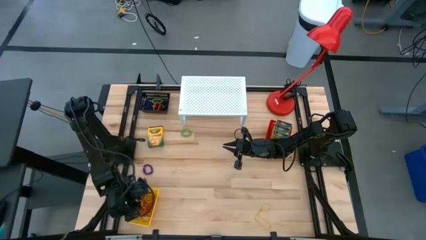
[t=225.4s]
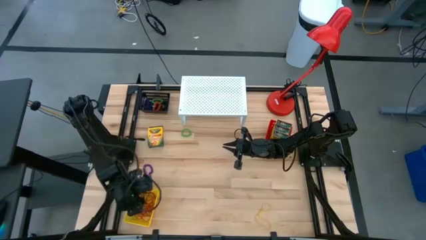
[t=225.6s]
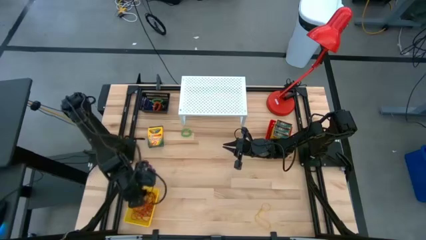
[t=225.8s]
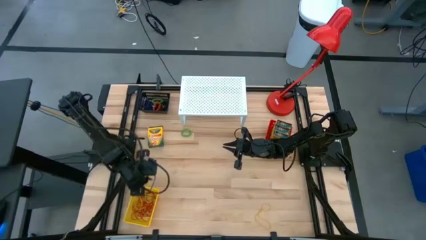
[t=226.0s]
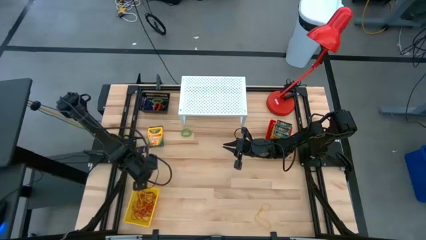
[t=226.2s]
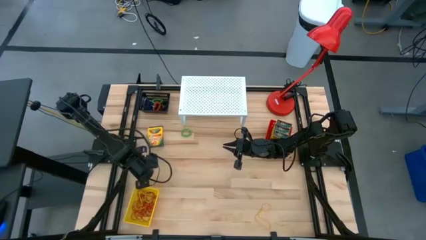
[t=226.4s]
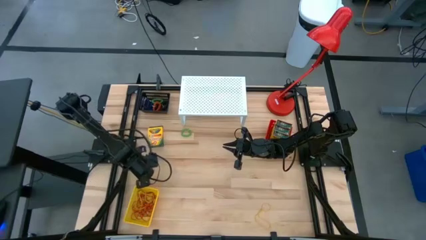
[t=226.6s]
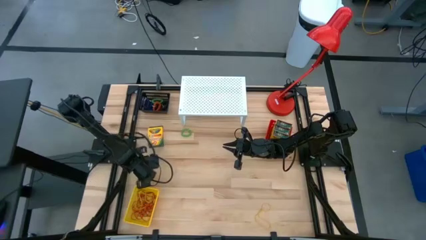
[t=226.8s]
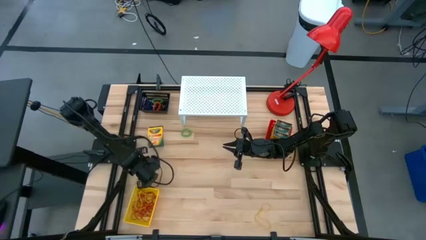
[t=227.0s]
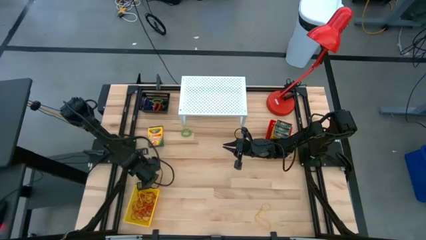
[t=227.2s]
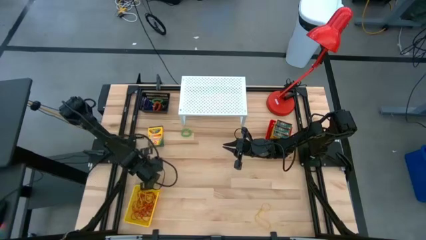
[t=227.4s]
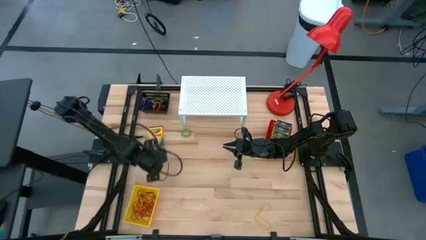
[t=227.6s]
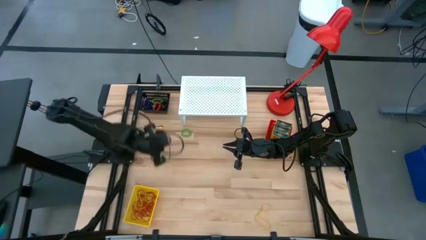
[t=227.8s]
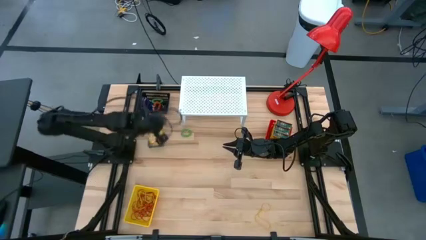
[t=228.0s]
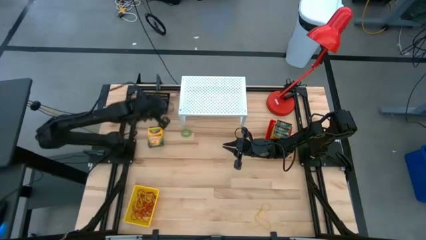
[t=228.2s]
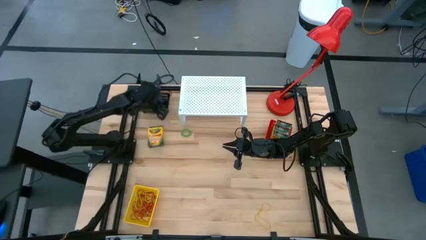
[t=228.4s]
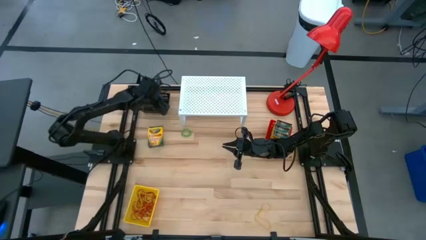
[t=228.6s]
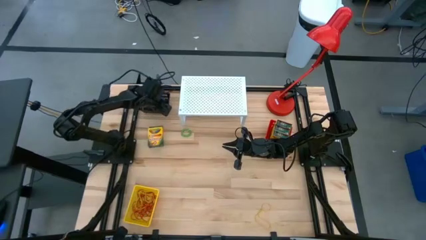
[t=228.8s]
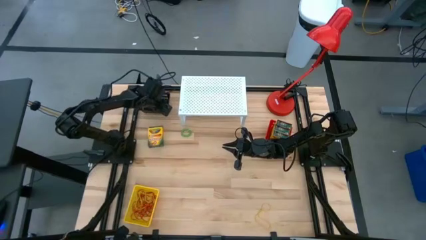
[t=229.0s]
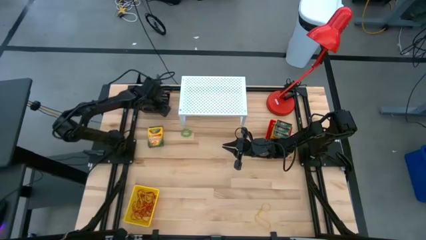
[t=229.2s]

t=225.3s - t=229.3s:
Task: Pick & Place Office Desk Supplies
Put the purple spring rubber band into the black bin

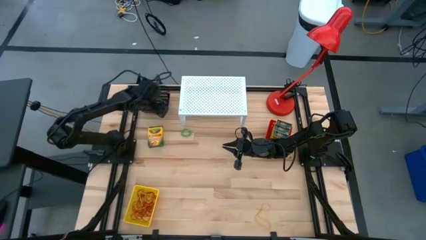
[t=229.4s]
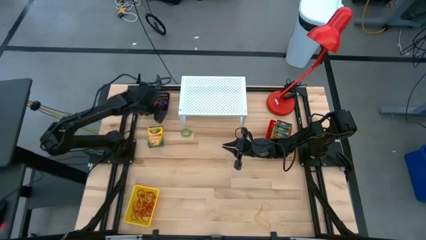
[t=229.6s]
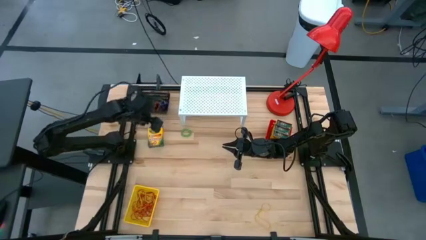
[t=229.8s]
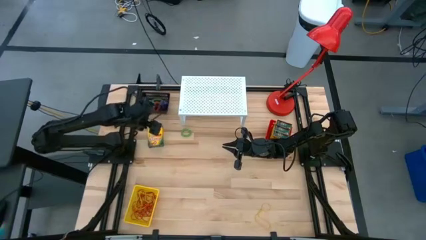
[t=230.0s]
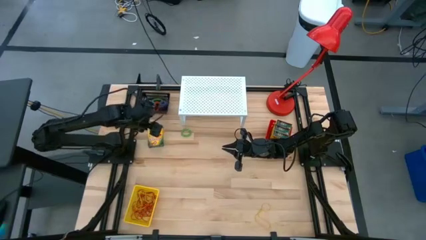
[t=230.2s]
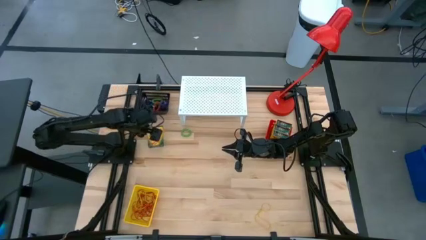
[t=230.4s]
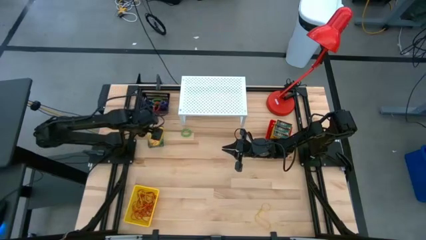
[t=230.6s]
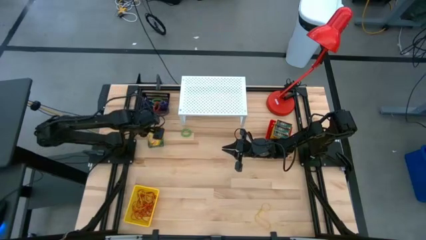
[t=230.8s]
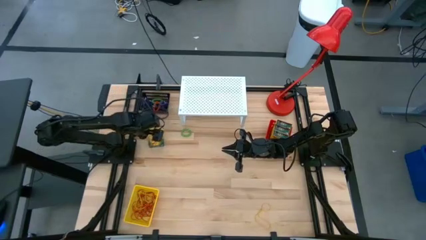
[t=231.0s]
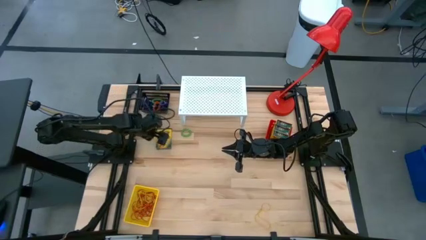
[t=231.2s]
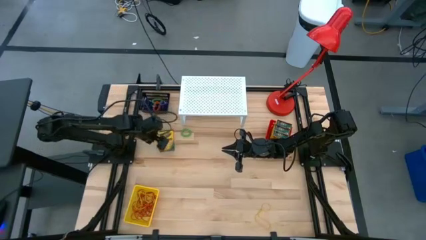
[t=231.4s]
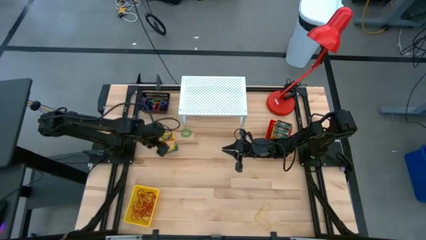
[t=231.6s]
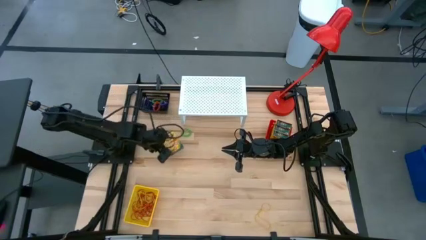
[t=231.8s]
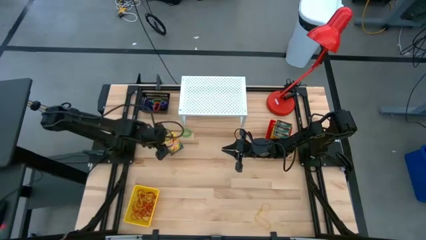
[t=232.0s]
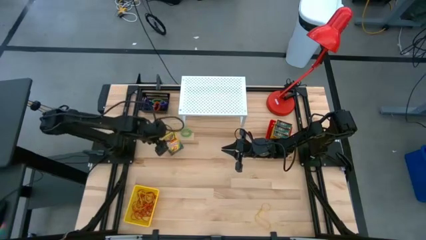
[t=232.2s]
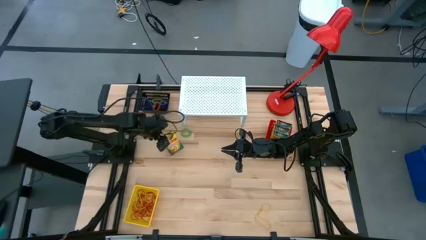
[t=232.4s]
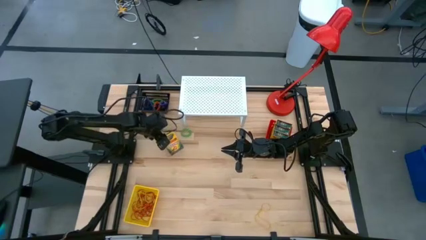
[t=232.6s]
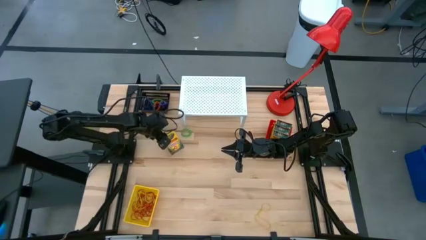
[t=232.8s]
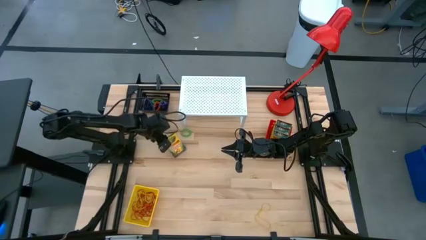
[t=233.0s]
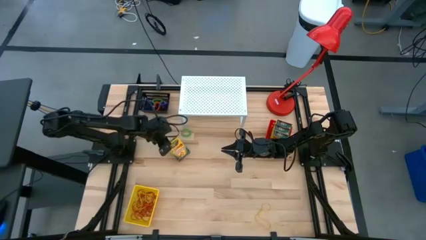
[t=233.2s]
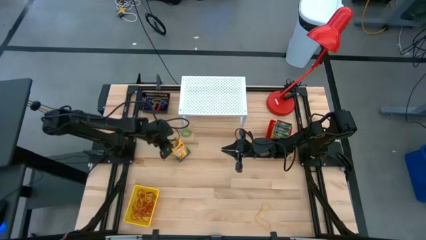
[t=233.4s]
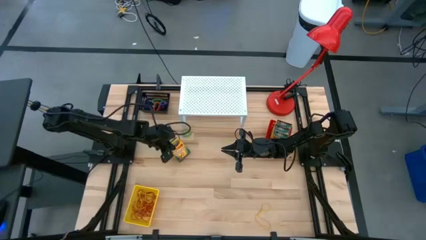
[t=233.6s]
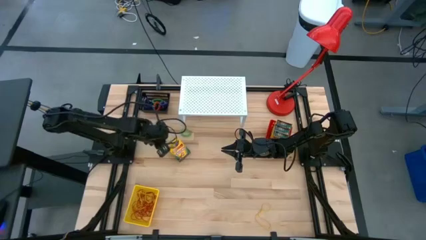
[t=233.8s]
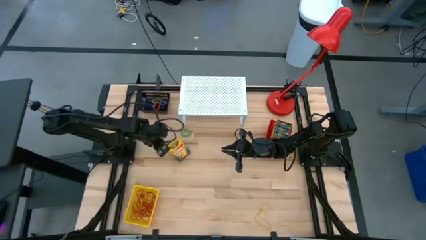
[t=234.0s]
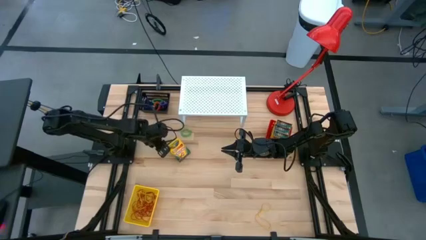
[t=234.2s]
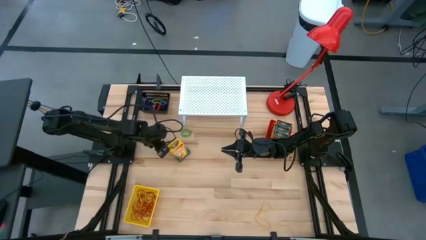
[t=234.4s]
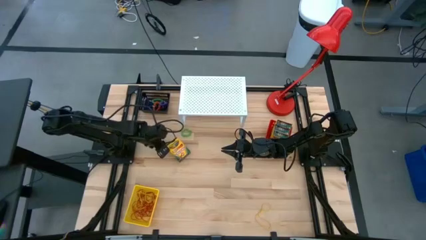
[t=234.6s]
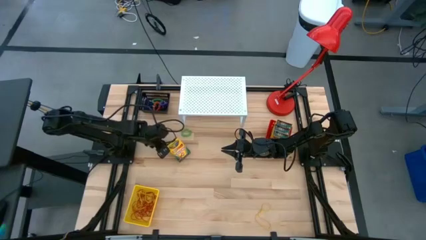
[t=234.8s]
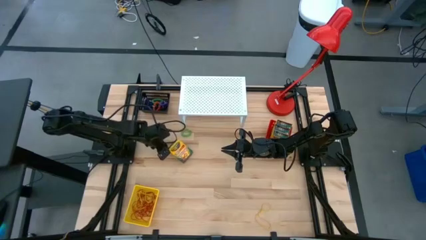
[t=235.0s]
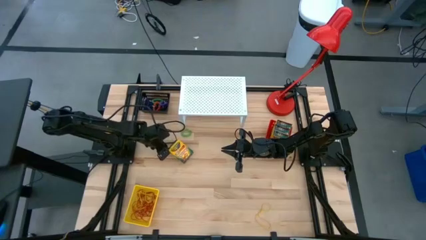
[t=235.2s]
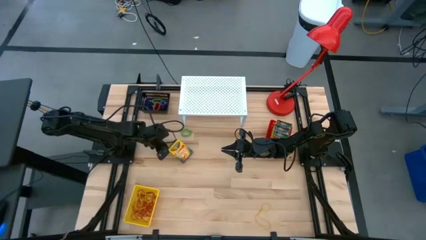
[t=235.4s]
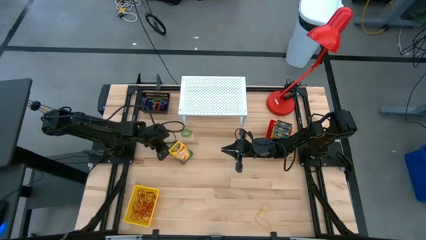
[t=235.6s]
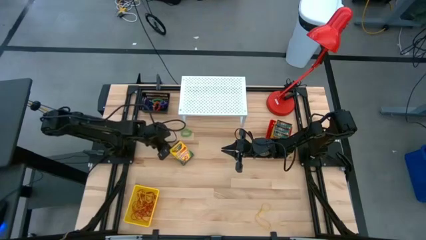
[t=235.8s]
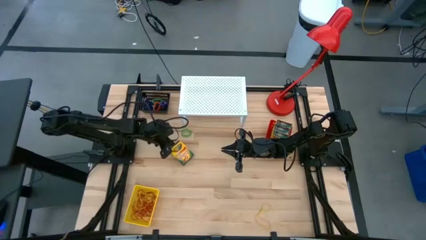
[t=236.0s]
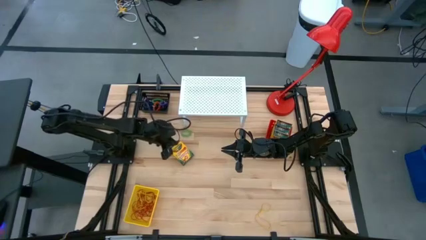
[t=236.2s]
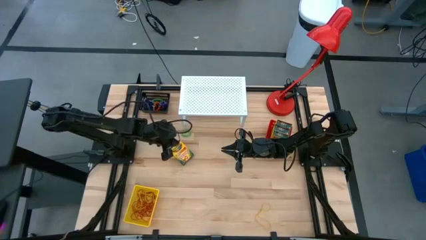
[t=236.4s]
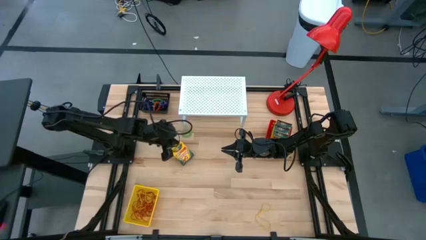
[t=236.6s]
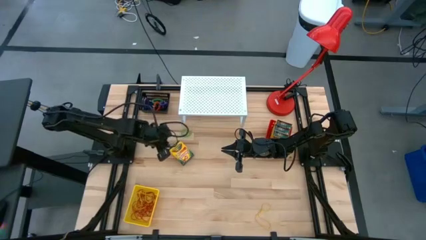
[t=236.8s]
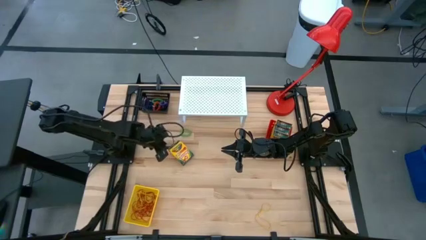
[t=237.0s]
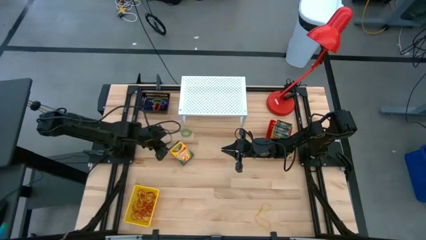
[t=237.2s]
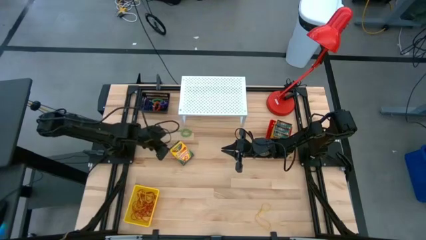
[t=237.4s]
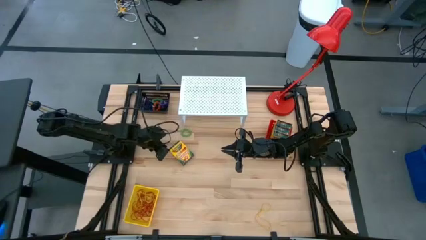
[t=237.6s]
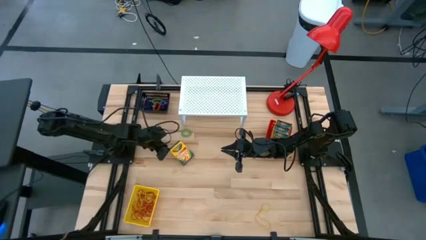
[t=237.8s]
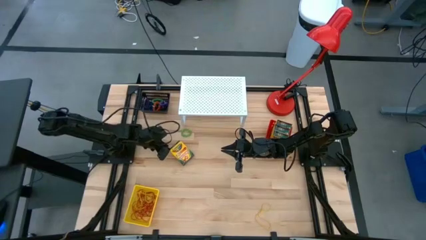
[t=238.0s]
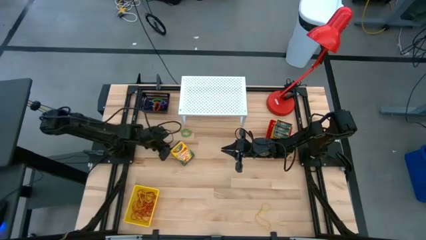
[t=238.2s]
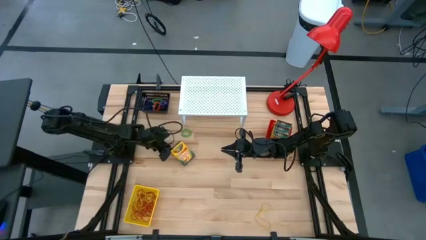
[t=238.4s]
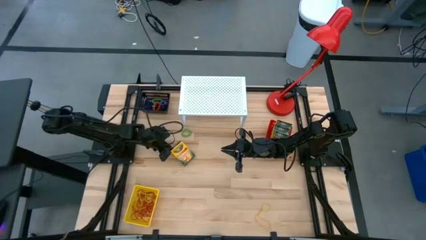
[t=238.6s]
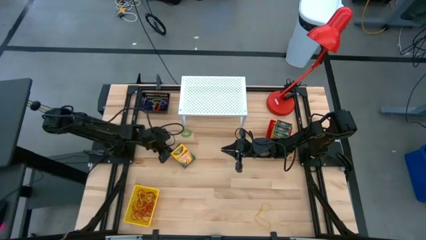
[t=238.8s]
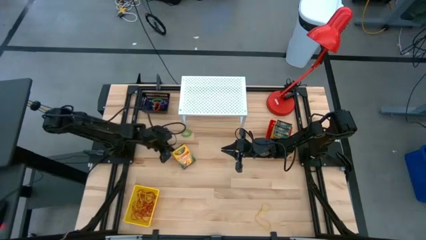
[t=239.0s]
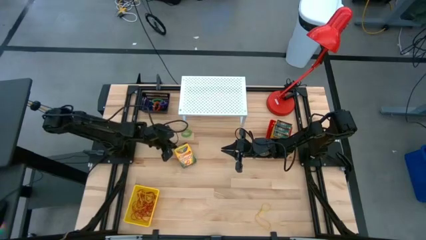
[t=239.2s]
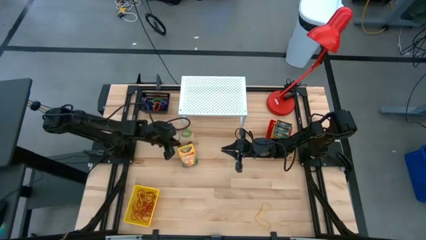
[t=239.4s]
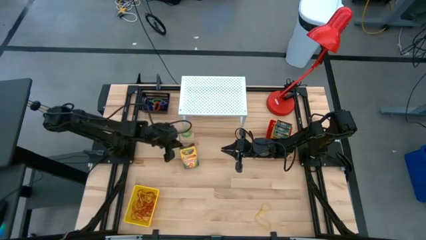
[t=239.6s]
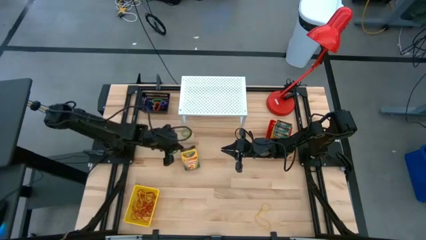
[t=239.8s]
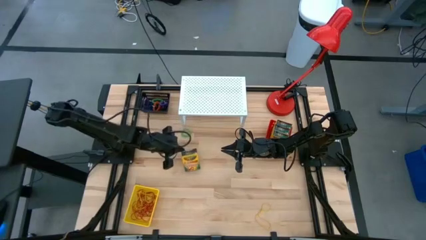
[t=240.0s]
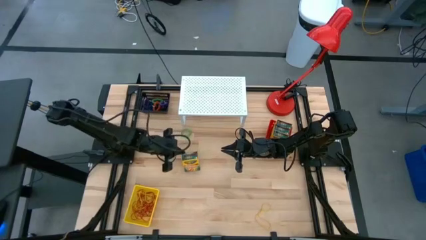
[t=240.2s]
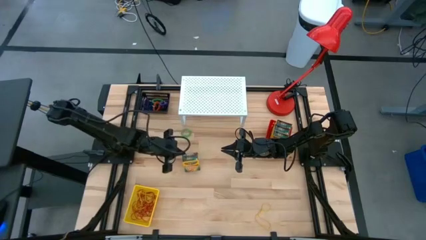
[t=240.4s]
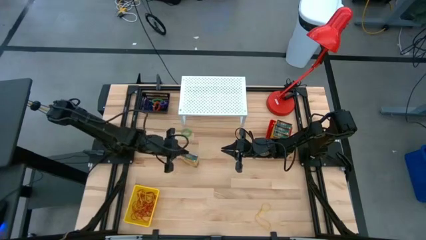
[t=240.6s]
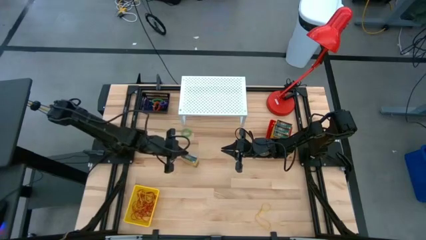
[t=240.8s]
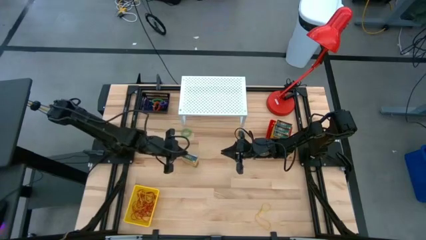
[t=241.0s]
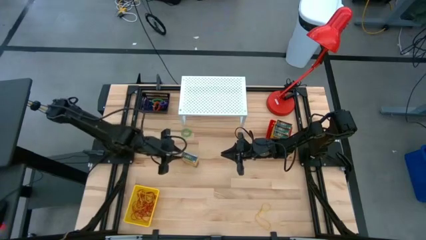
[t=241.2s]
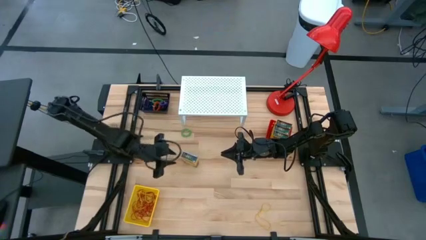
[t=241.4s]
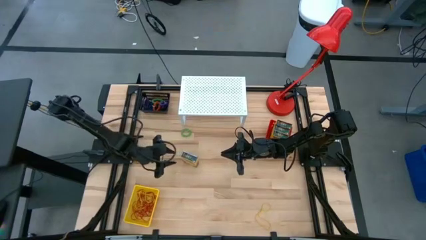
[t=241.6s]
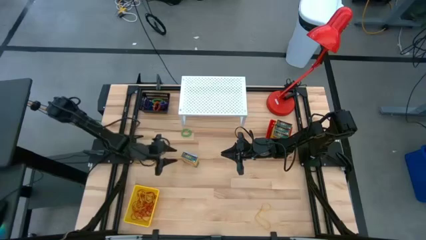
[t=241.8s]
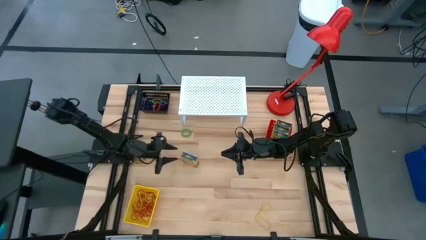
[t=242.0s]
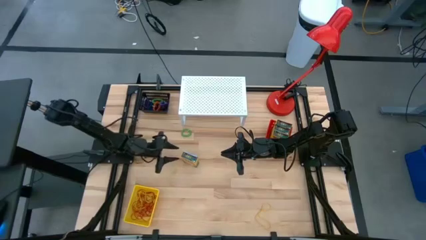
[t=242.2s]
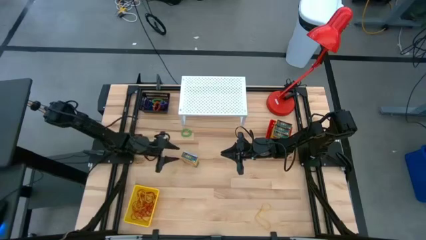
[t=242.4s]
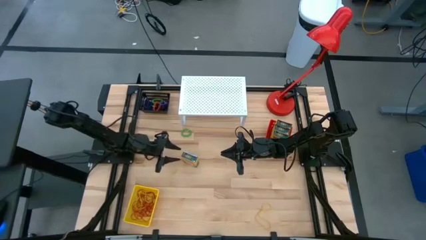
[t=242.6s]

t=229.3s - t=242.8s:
Put the box yellow crayon into the red bin
